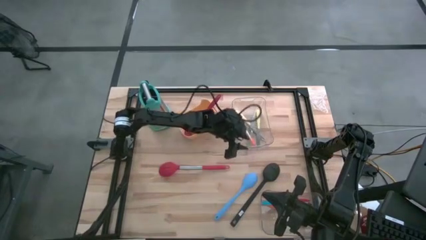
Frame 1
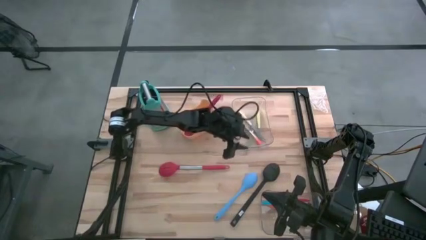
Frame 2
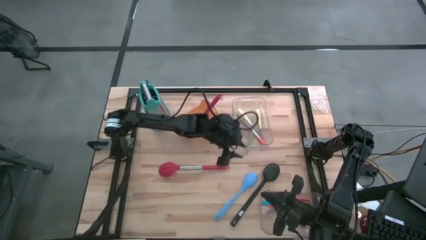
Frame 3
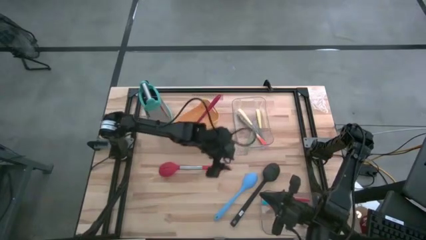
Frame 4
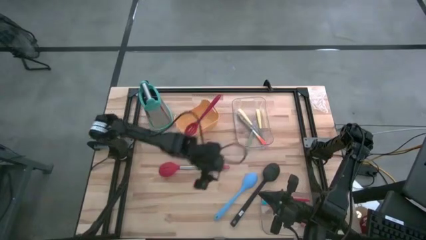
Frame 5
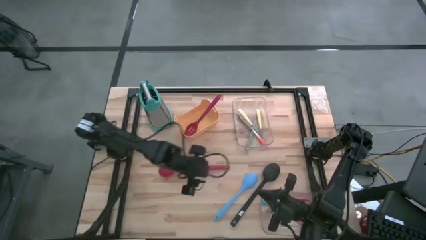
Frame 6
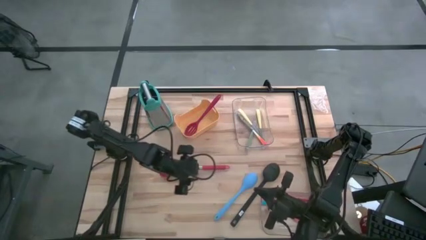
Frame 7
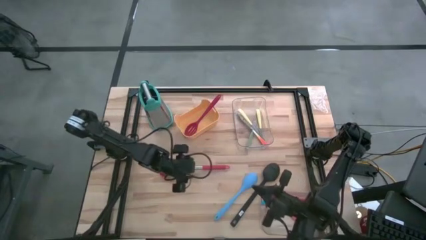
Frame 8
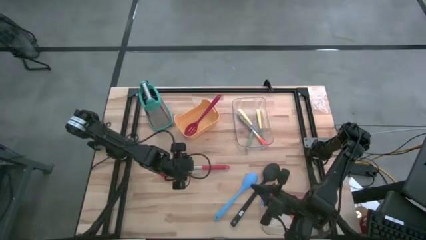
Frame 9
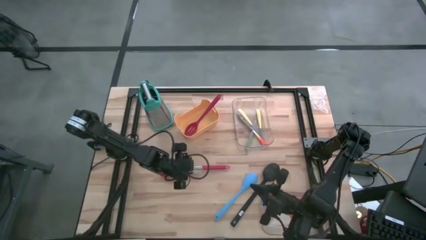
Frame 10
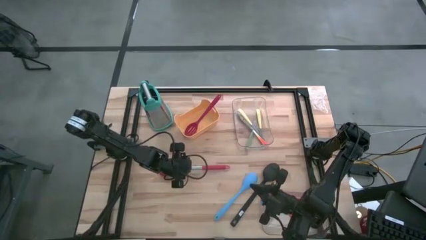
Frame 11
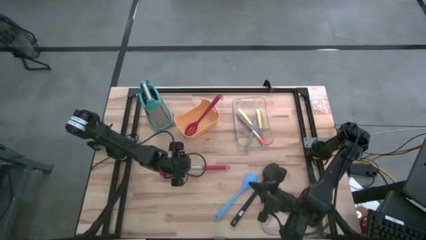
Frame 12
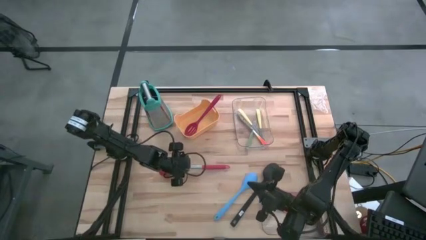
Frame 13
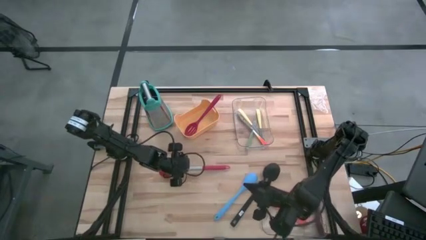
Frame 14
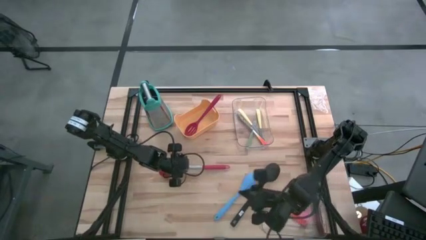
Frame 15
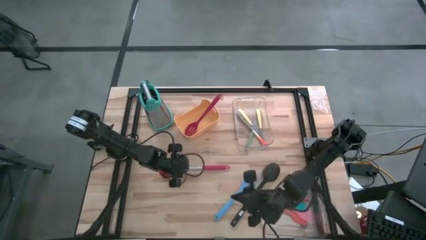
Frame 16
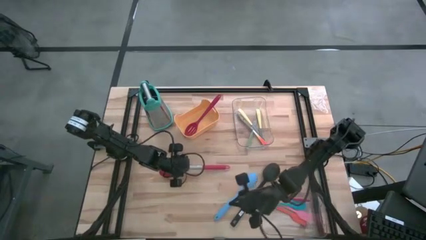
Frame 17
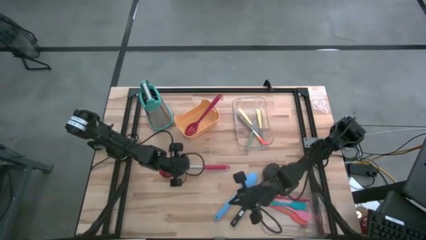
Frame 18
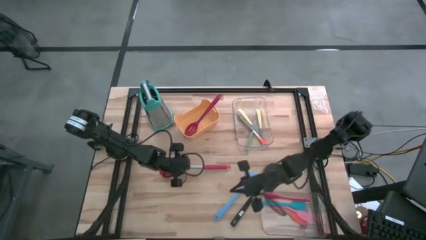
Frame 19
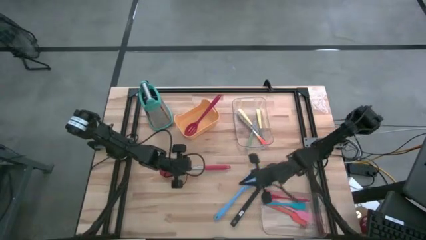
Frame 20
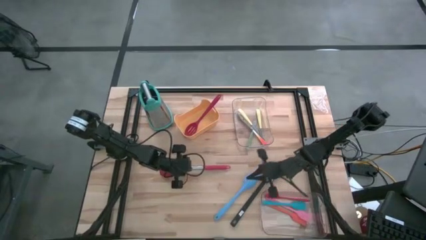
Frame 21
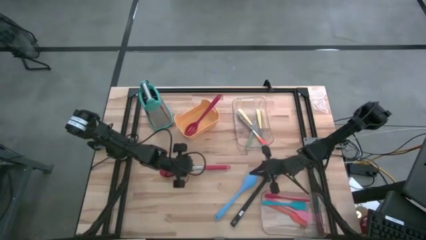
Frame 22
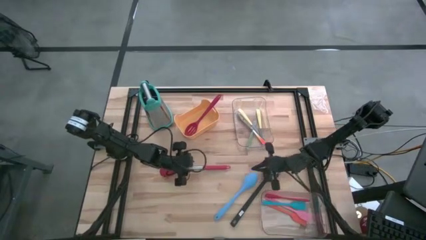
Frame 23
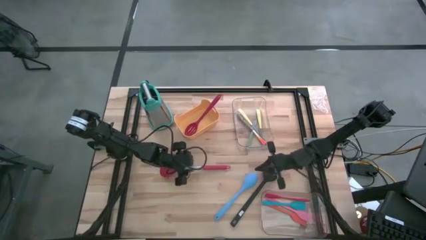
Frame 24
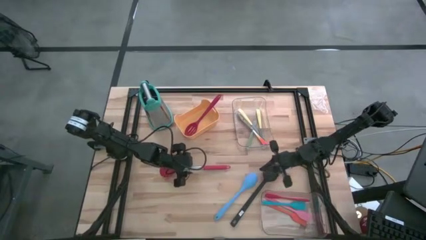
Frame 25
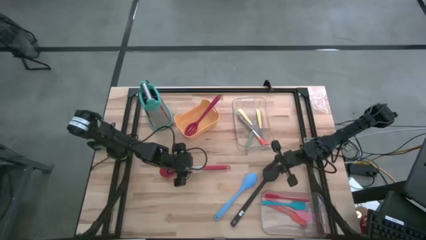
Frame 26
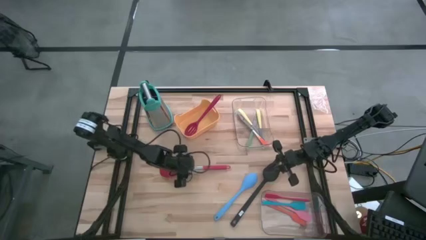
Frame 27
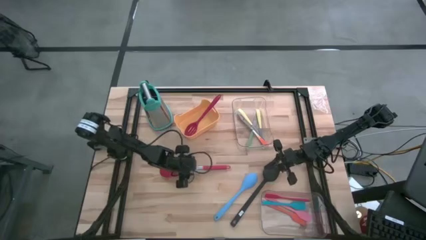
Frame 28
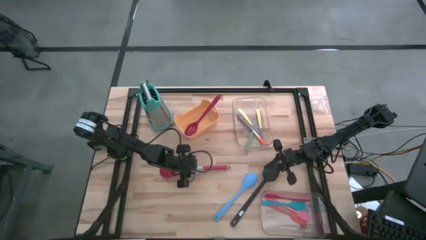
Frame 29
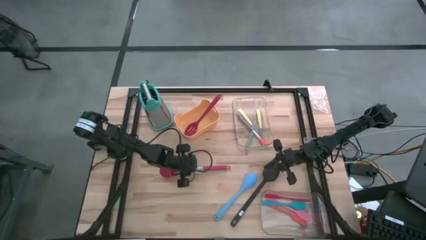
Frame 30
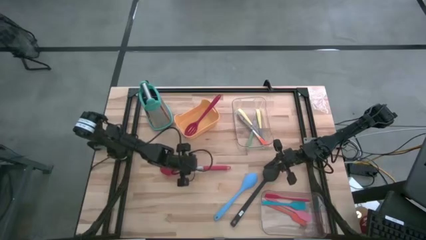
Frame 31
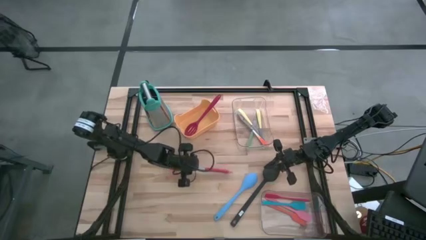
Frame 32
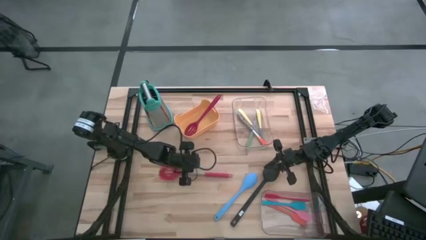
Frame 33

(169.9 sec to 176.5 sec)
Task: Pick & Place Kitchen Items
Put the red slotted spoon into the orange bin

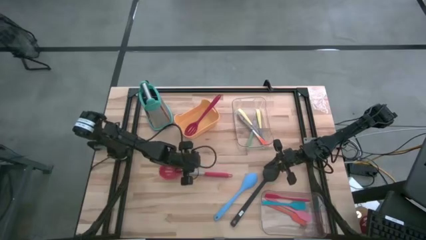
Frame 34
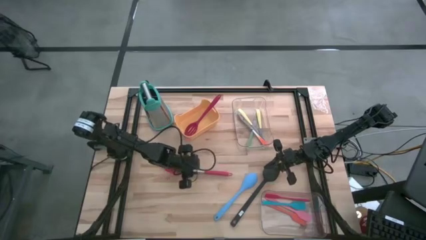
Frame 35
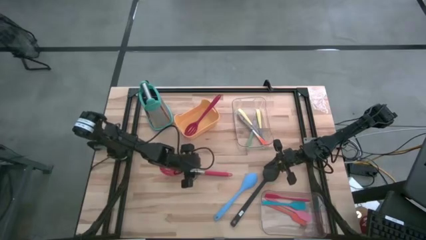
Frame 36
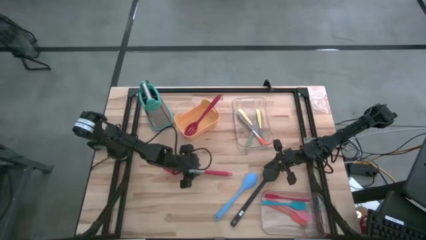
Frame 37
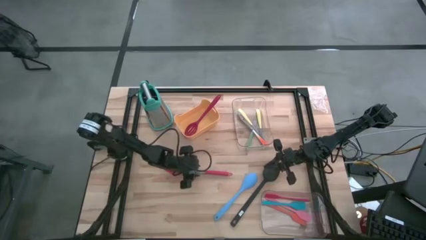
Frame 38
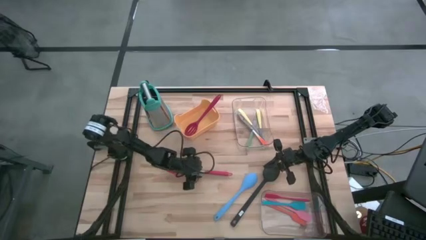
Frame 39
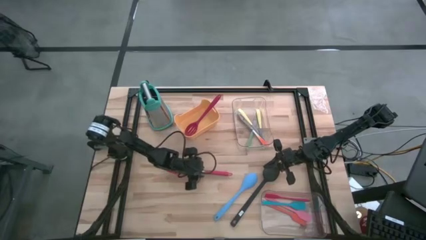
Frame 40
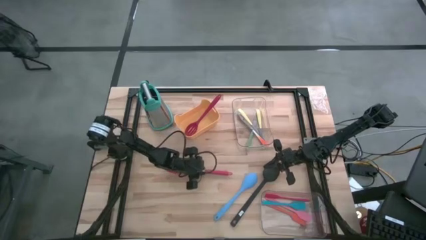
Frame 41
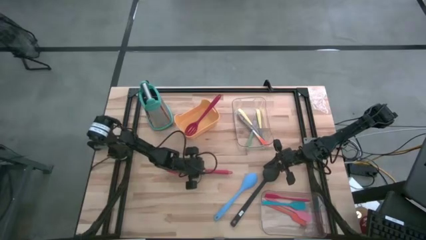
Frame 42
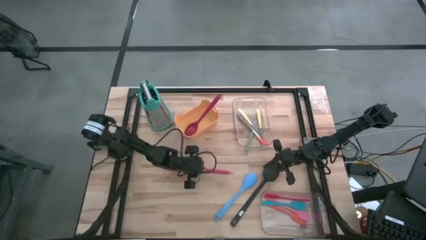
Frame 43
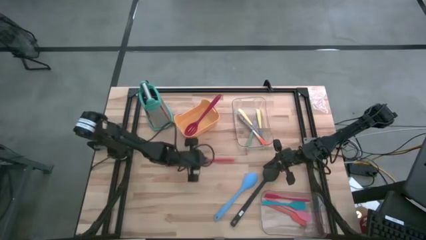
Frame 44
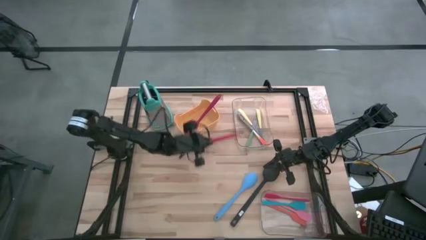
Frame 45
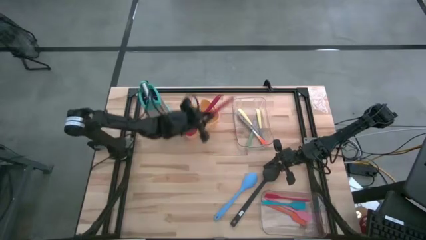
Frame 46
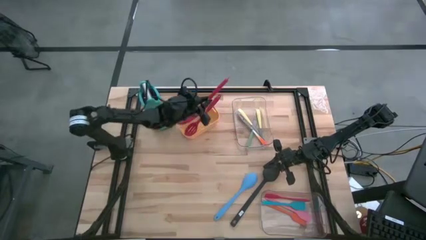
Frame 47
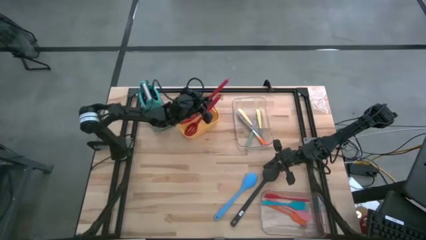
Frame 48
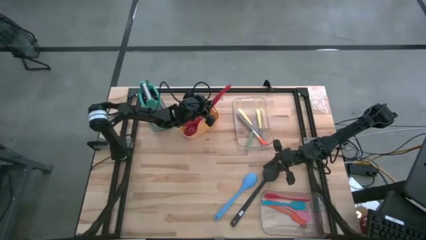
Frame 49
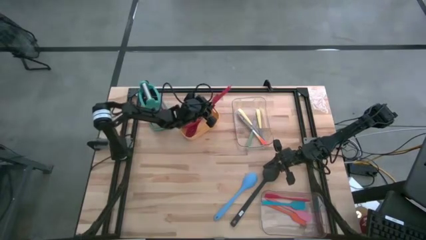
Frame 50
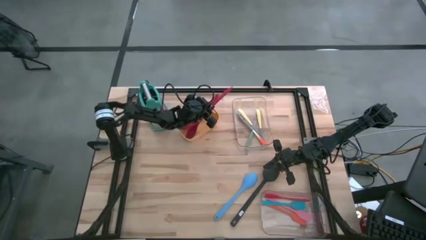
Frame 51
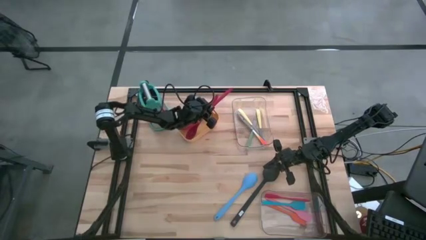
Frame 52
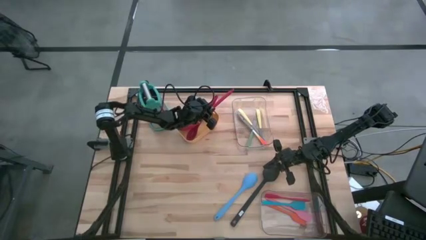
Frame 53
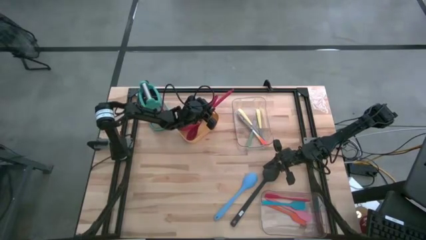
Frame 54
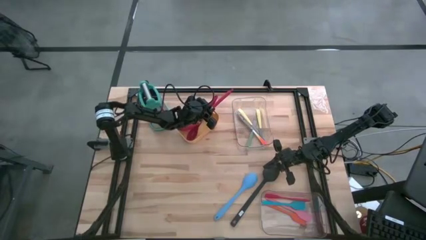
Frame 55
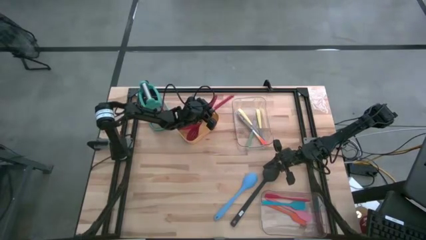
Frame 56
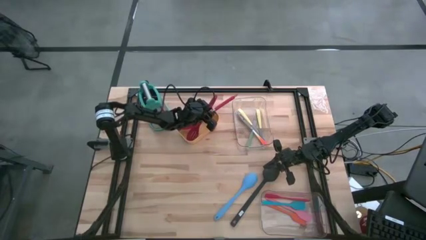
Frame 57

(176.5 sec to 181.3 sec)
Put the red slotted spoon into the orange bin

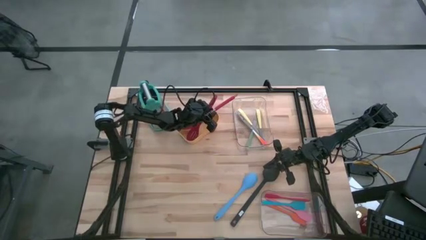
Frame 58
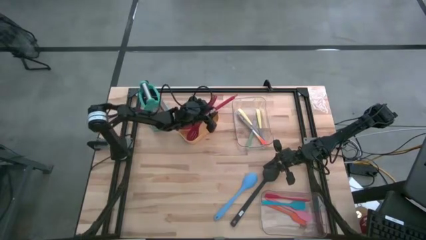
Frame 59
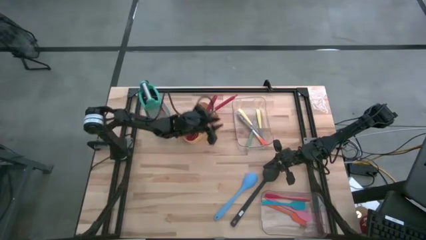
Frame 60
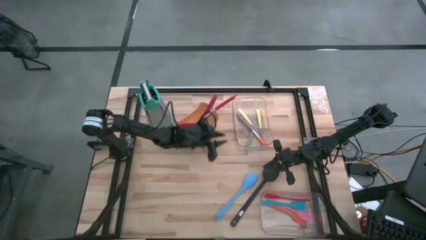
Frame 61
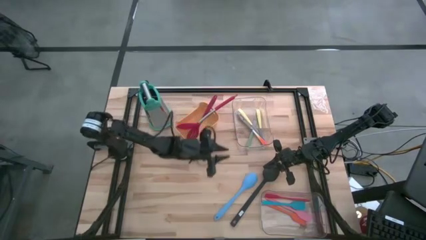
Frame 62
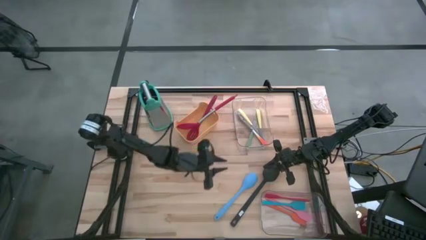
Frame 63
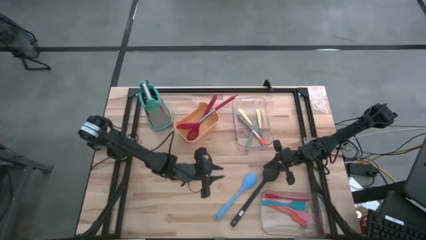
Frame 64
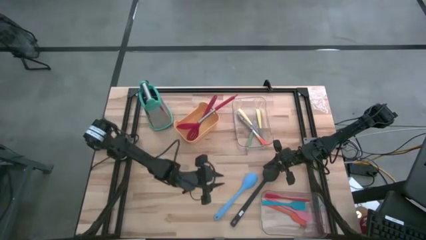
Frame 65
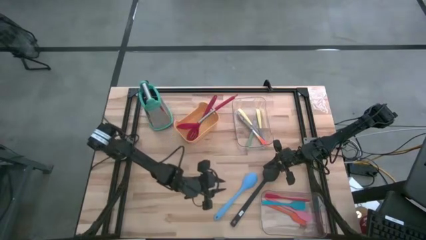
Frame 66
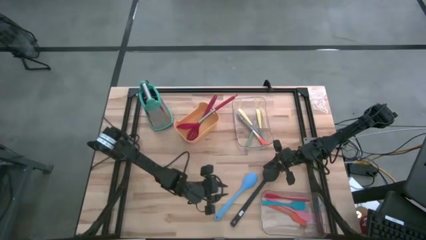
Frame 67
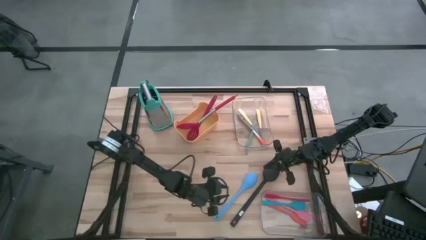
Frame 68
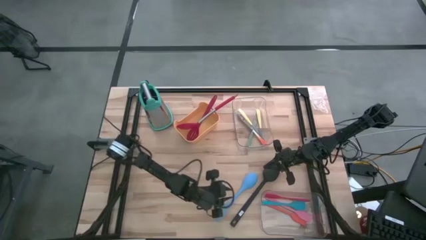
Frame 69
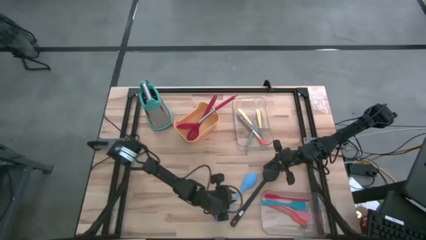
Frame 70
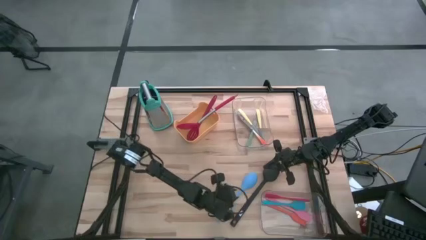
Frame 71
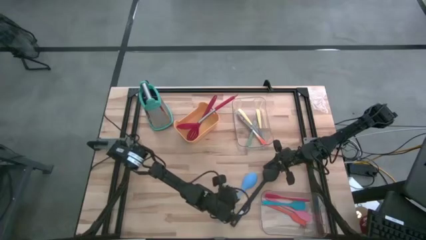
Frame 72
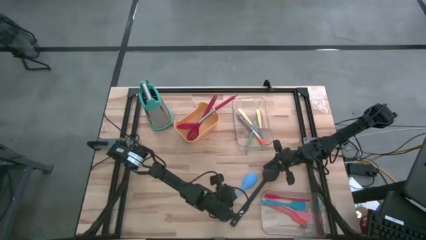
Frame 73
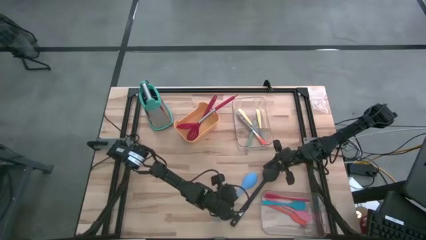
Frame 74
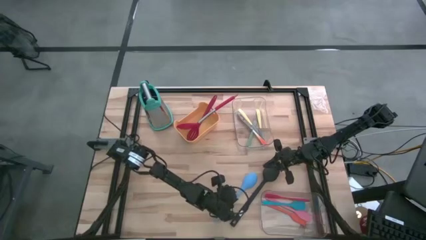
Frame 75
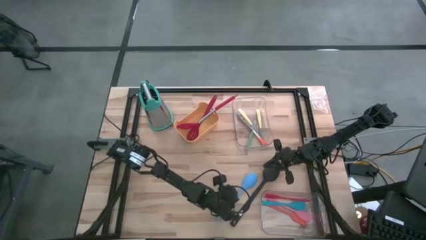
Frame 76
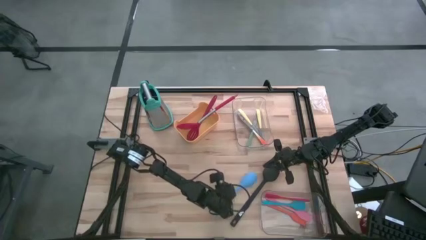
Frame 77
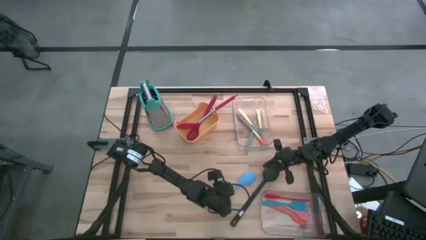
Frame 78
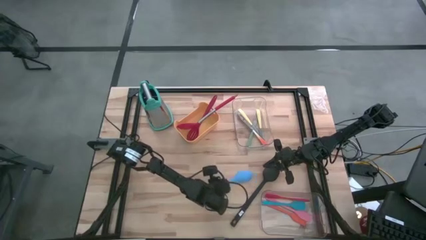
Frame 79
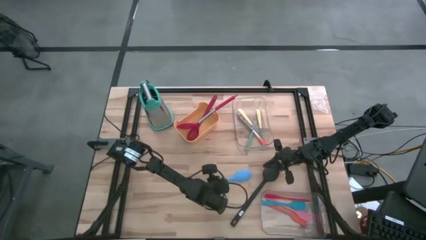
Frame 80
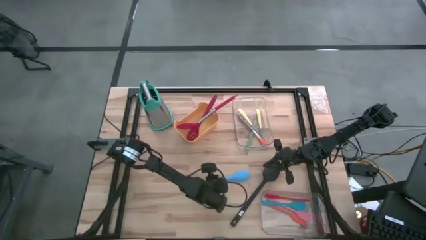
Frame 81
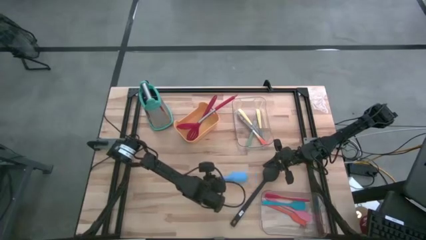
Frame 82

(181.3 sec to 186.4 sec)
Put the sky blue serving spoon into the orange bin
